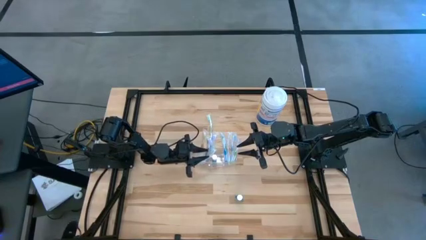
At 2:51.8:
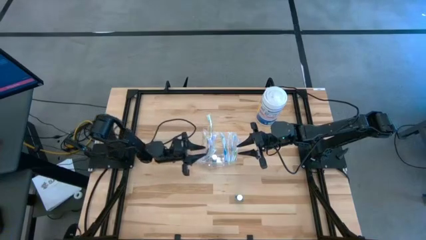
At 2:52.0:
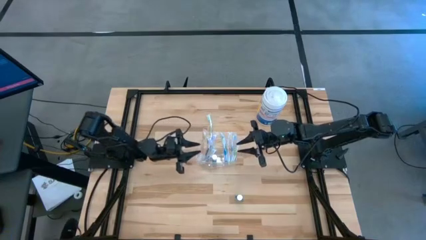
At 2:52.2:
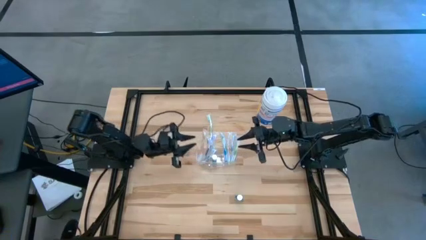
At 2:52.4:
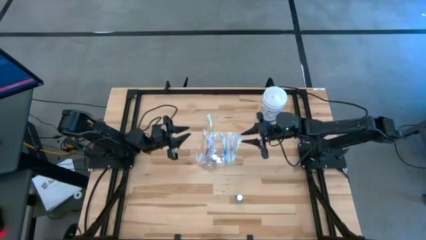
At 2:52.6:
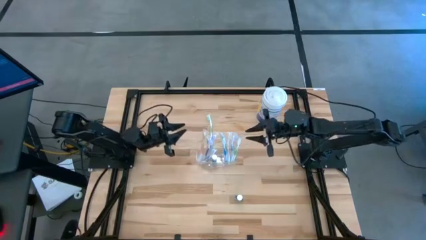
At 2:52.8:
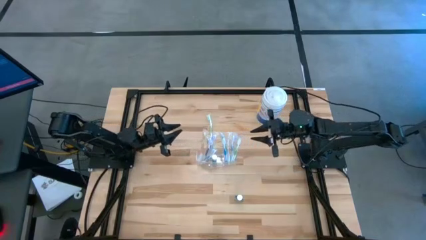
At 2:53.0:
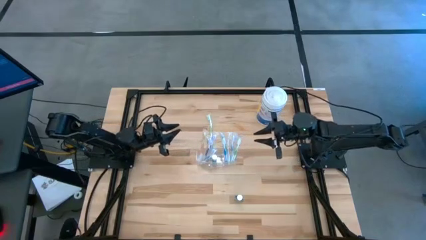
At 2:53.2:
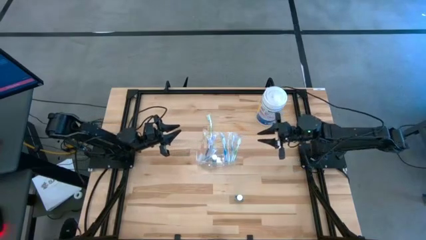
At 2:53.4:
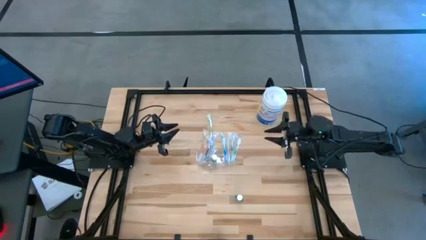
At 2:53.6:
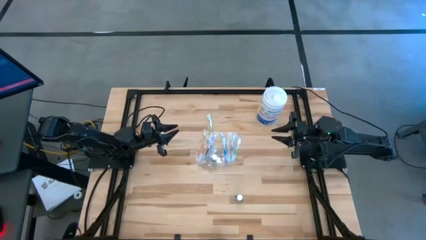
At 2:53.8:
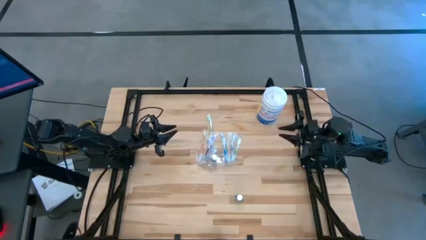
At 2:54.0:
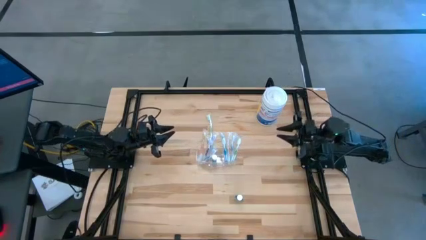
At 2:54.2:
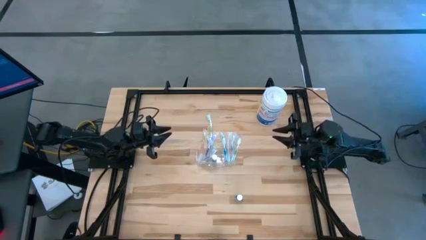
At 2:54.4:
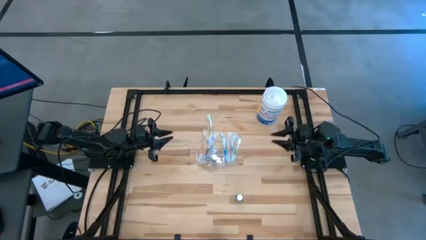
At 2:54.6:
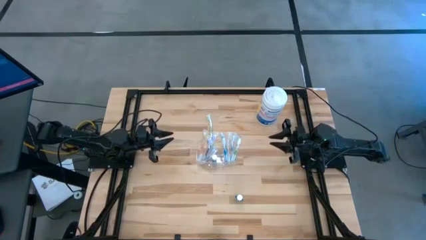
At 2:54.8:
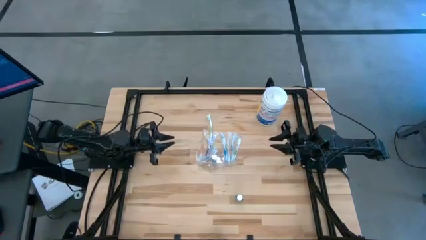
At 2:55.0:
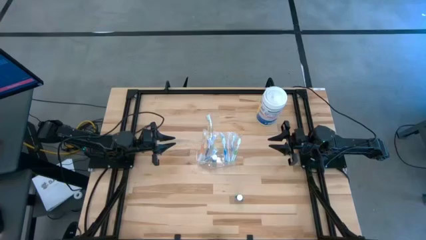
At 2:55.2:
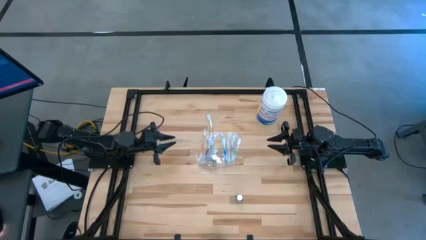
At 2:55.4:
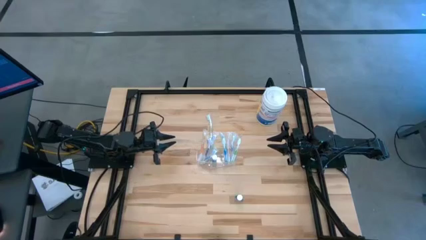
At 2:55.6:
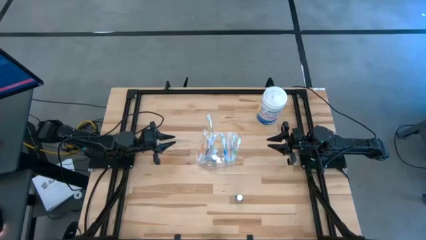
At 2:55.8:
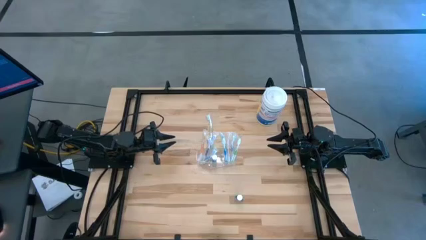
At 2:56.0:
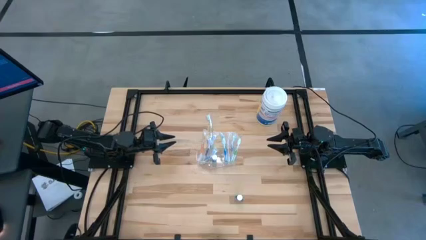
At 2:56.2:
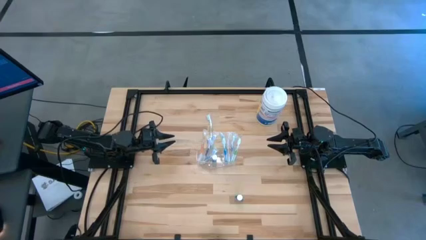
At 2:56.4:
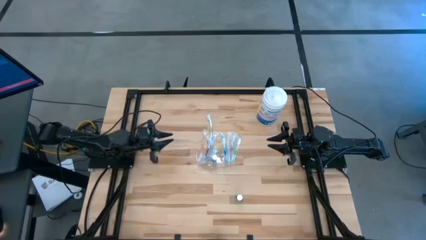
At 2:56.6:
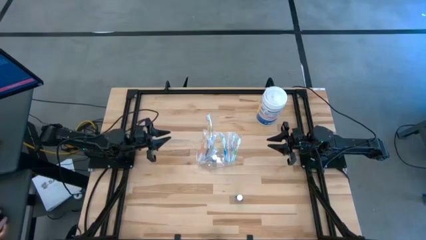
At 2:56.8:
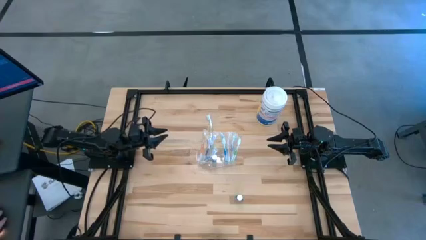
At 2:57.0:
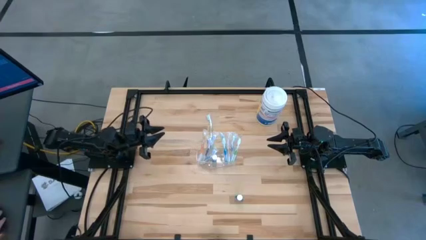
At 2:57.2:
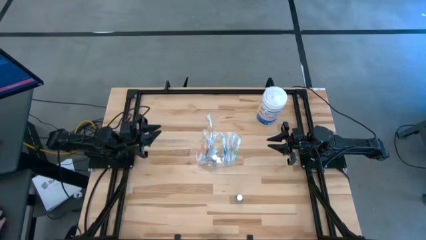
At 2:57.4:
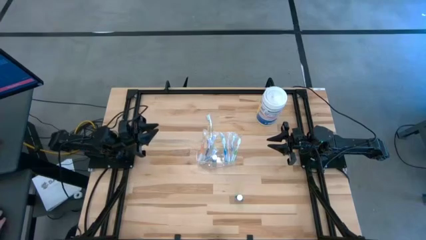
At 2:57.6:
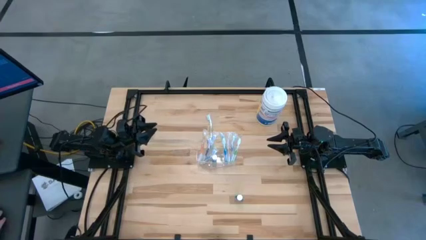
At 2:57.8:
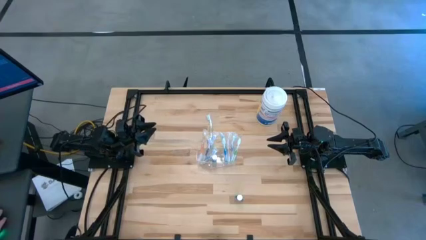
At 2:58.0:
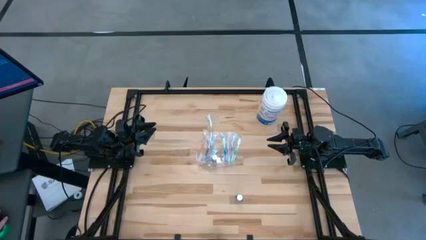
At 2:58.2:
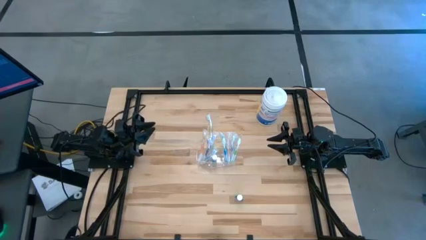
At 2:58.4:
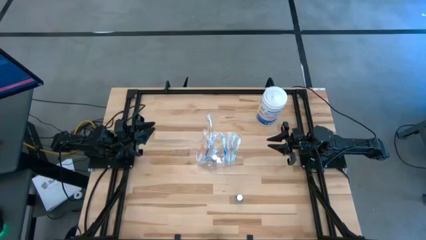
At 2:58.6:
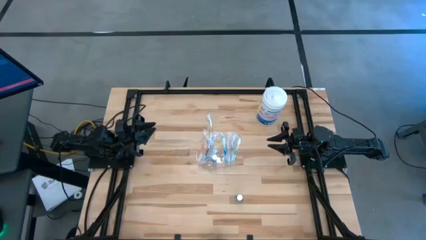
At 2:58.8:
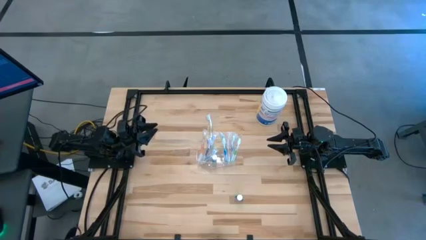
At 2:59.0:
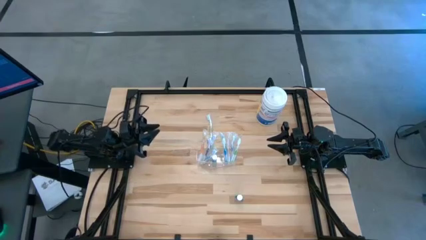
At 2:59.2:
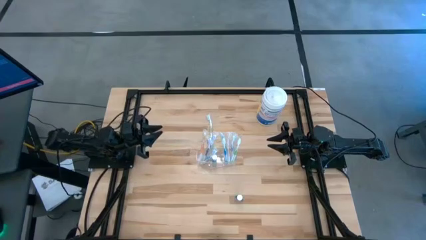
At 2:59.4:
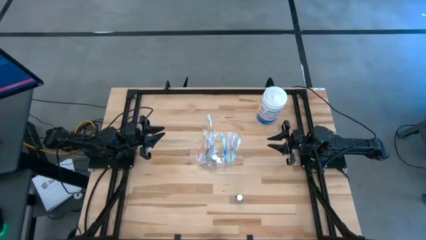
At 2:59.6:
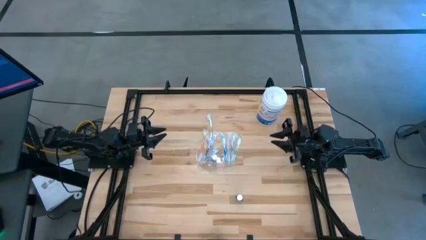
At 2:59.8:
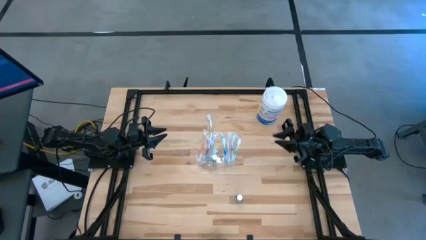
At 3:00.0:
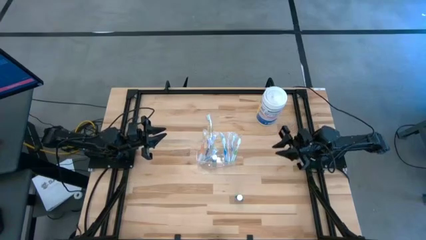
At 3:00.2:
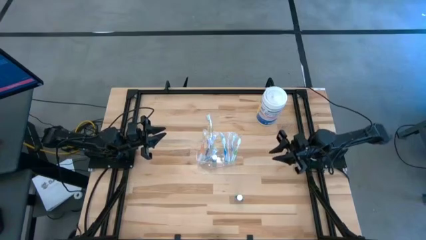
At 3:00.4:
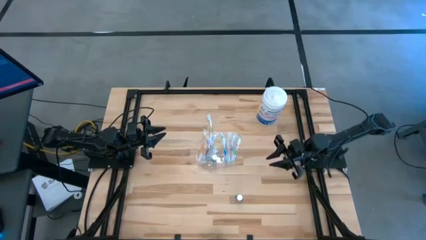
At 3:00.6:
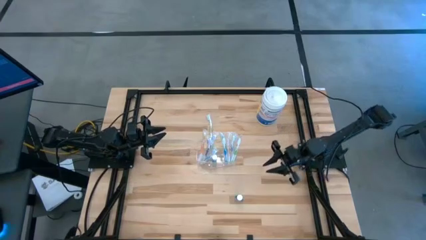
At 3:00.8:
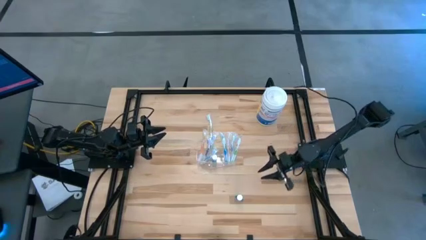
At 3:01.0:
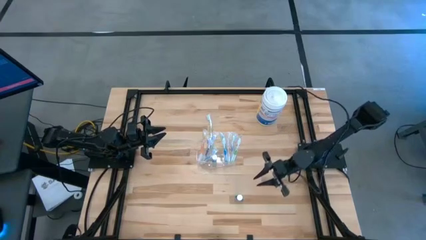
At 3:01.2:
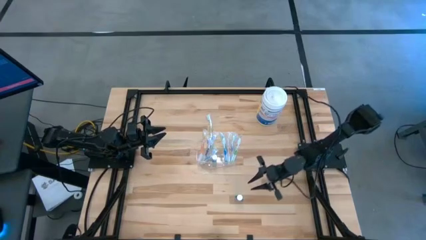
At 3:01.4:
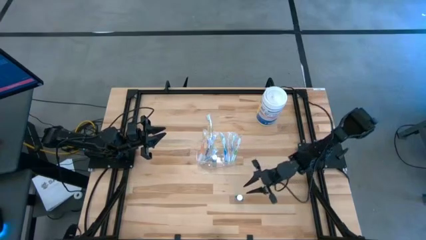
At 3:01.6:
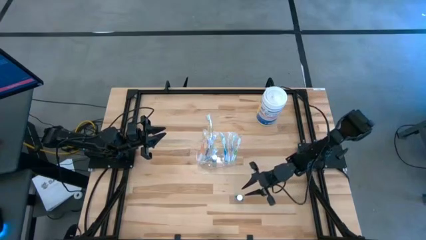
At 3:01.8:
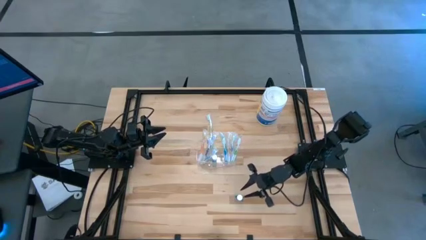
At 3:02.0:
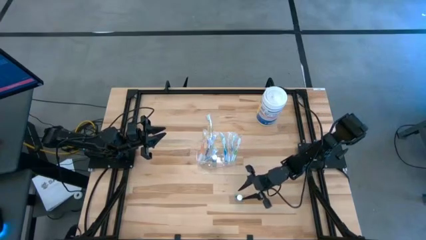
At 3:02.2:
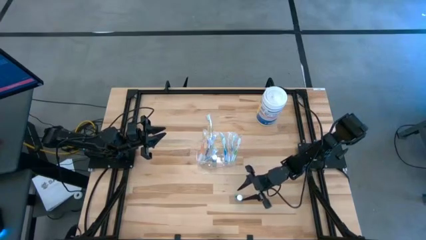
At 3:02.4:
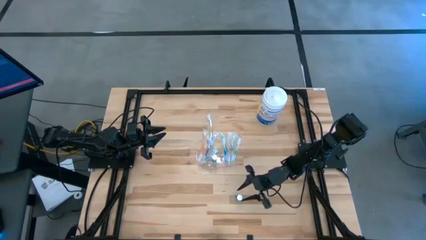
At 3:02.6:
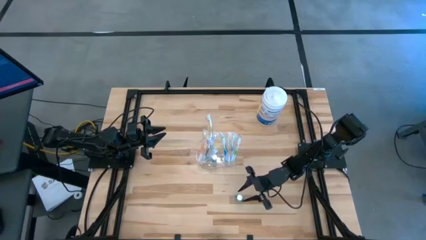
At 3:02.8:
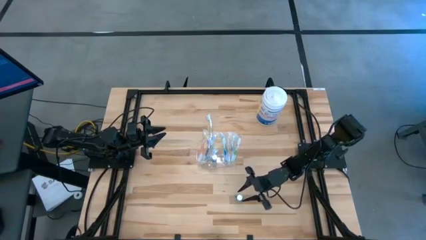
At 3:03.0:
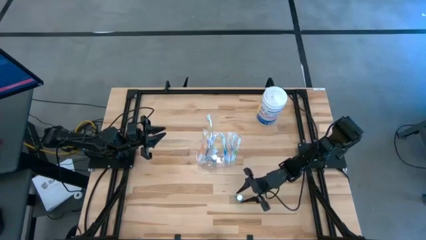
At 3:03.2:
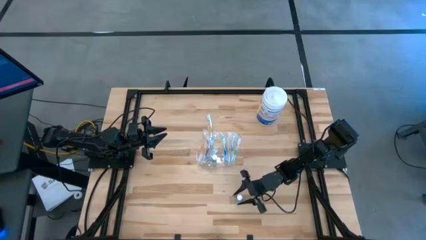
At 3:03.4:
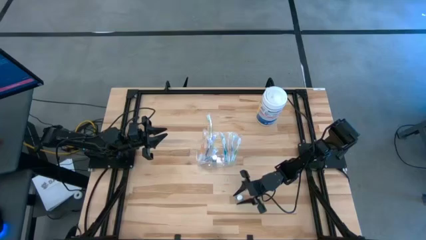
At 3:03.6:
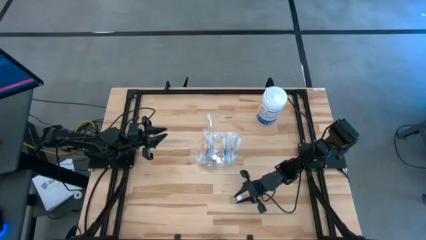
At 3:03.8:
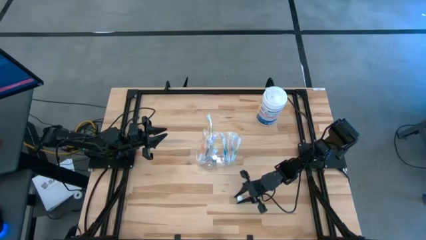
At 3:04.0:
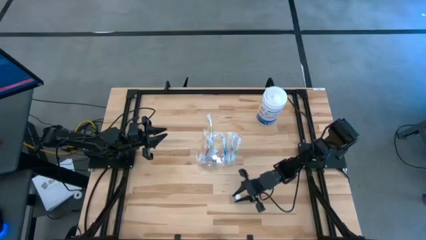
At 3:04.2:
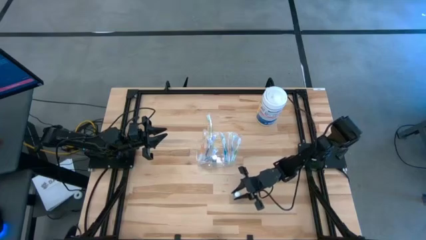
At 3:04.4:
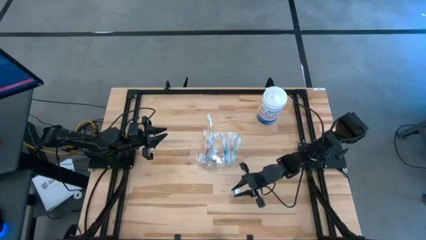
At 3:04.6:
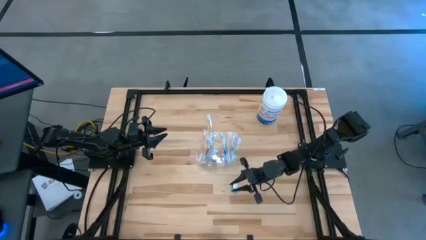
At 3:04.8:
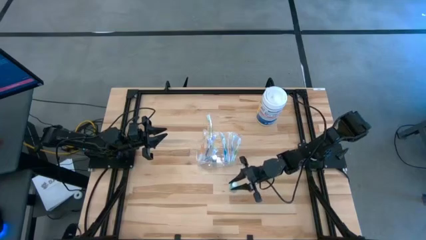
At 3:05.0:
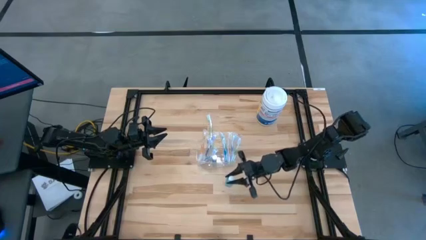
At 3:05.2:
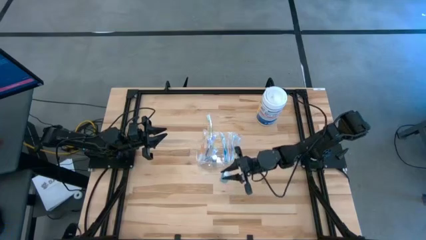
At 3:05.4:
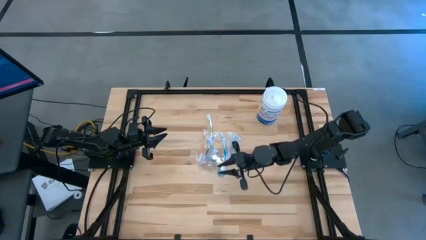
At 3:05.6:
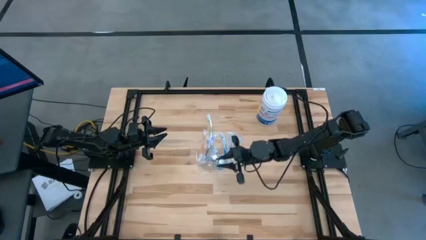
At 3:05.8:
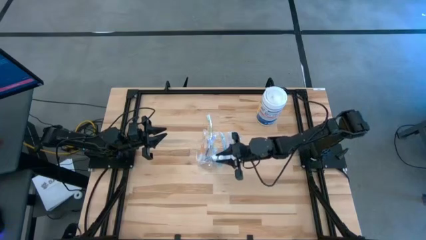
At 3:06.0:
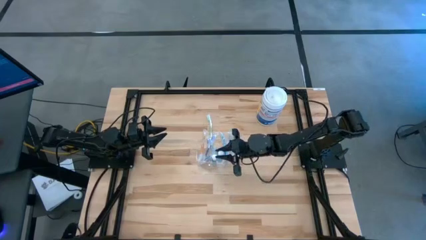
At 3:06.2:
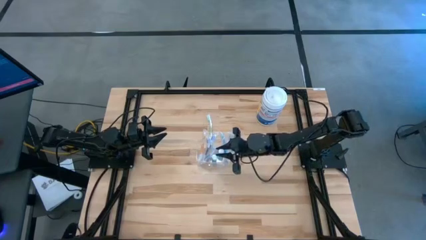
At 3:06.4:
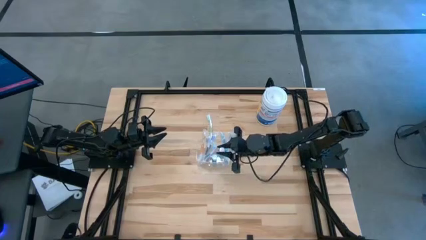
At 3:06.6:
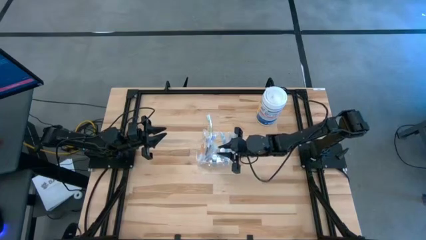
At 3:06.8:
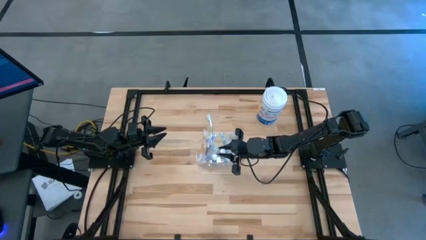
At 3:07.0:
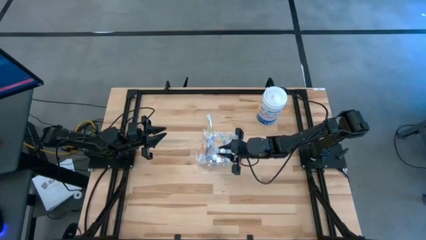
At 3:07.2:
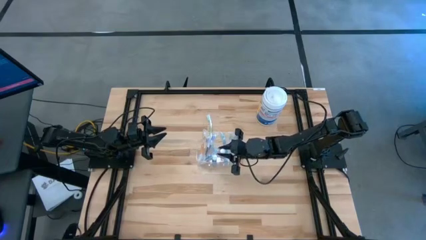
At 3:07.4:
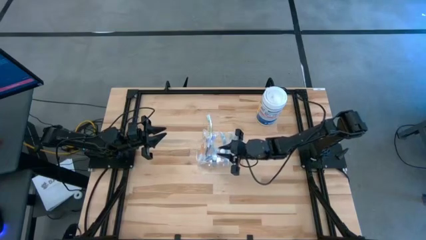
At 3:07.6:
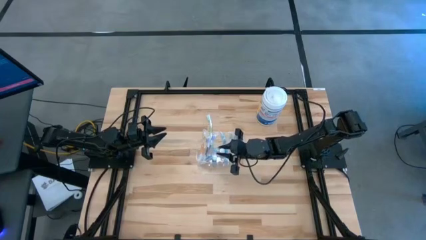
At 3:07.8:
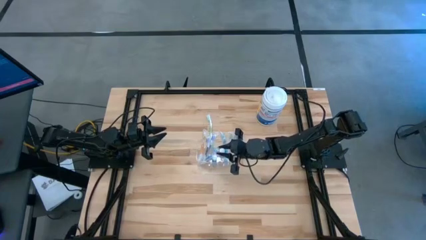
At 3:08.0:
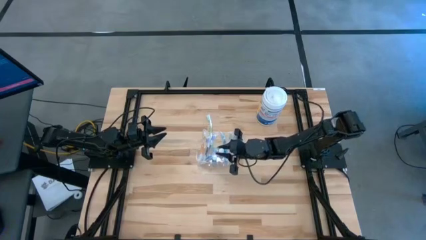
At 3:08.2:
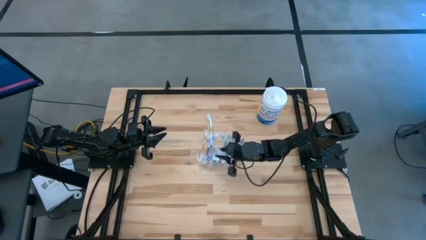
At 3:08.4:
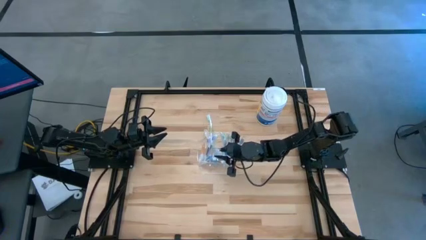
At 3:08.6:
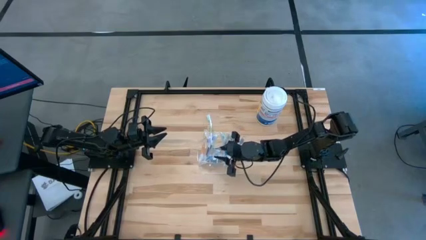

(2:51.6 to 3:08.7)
Task: Pick & Place toothbrushing station
Put the mouthwash into the transparent organizer
